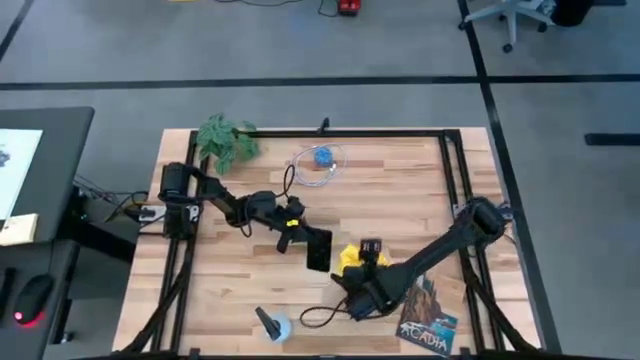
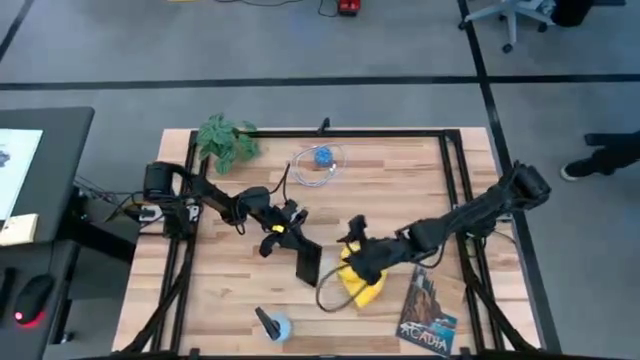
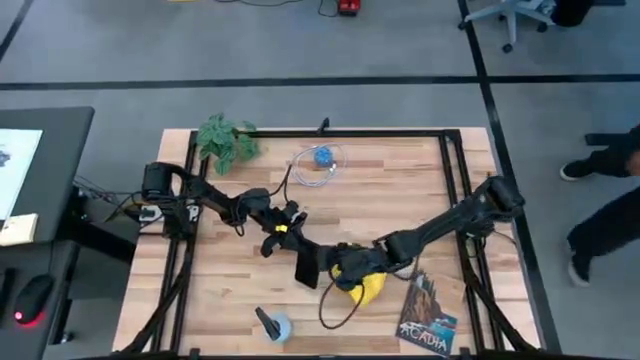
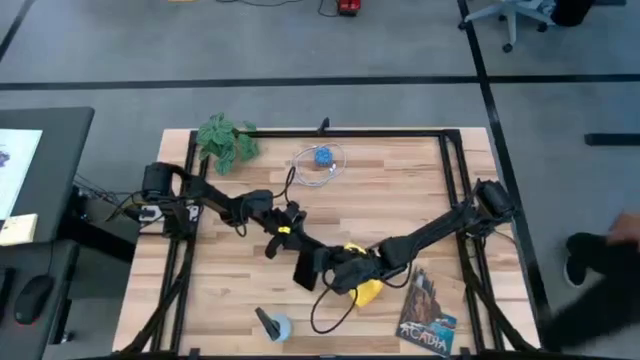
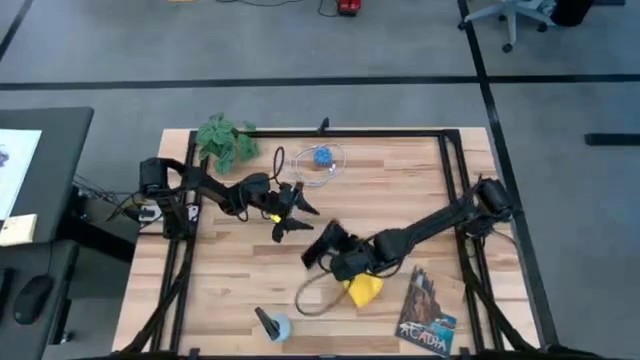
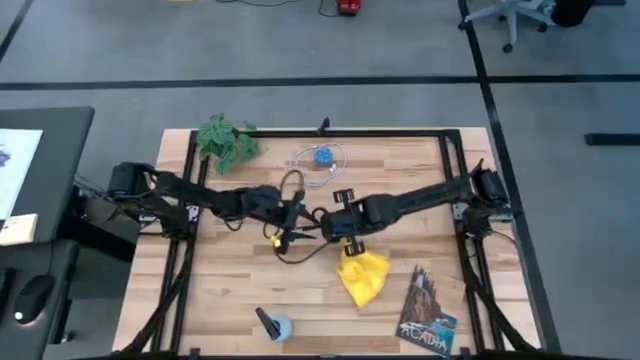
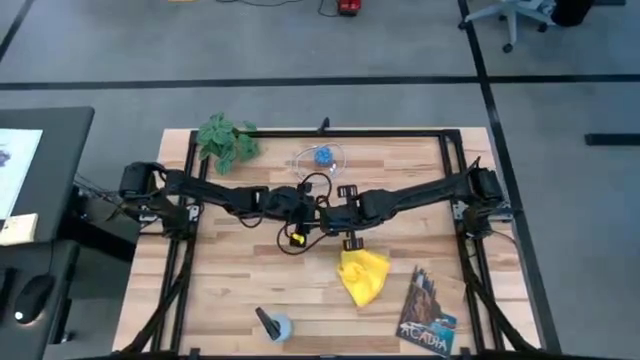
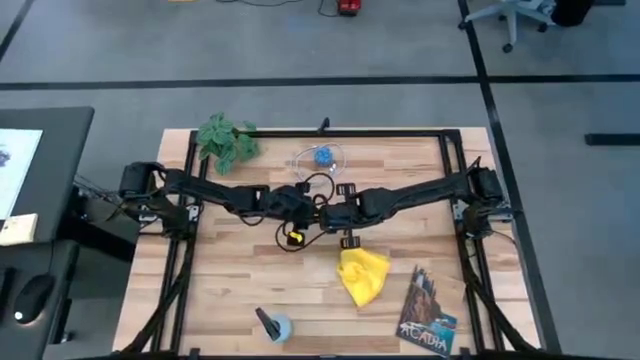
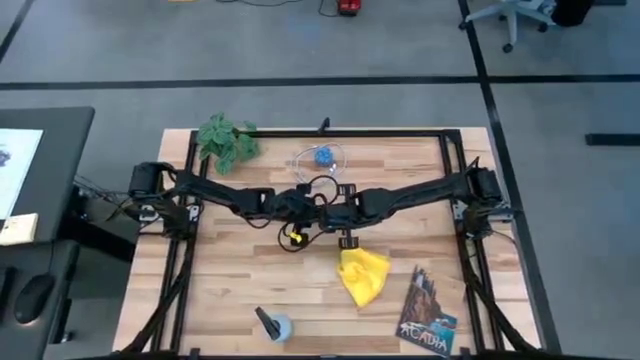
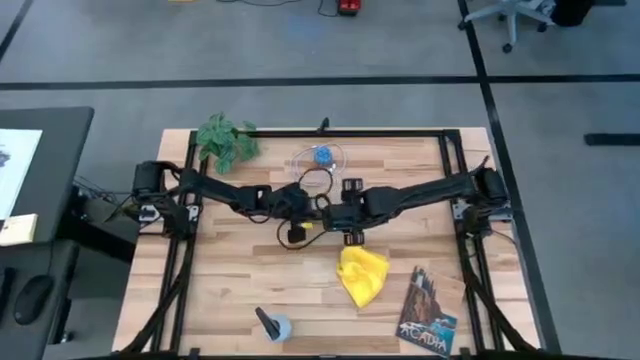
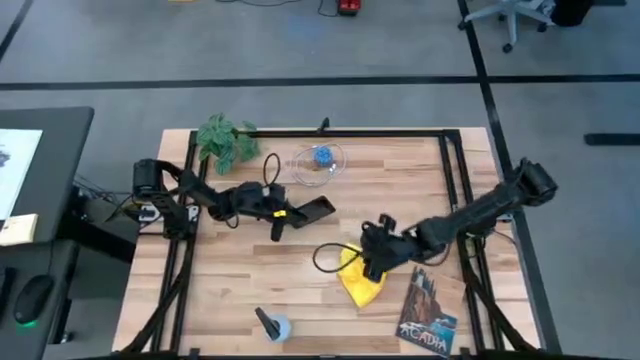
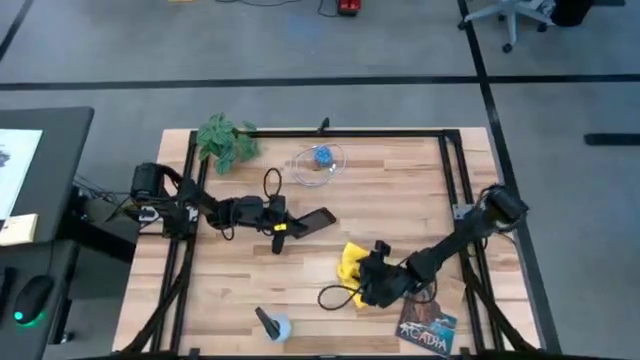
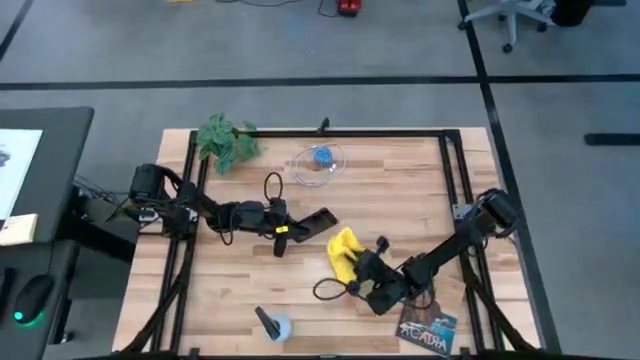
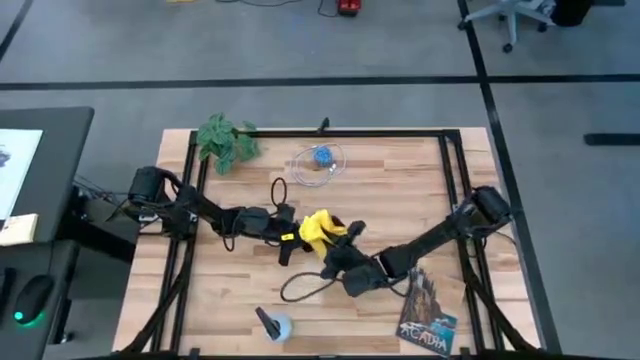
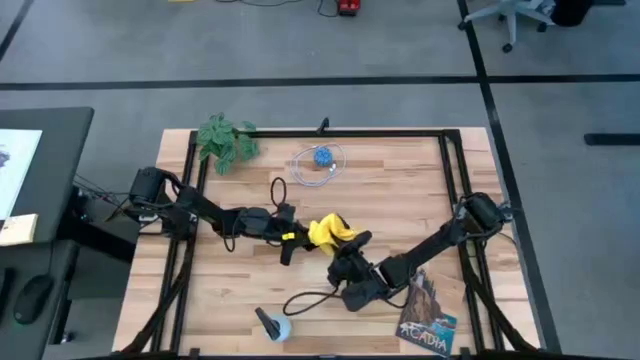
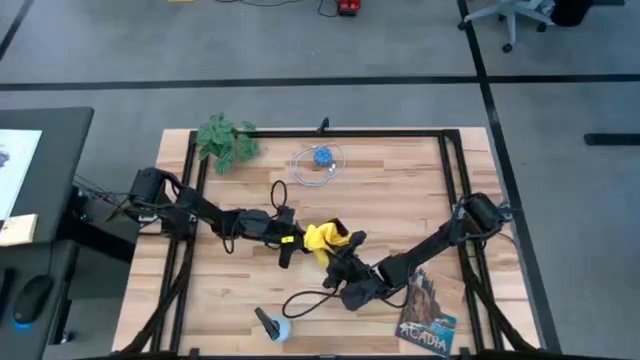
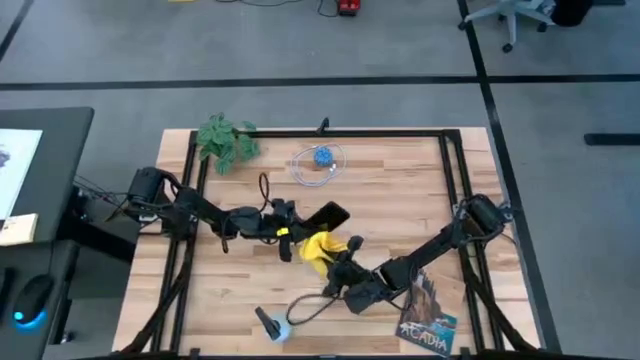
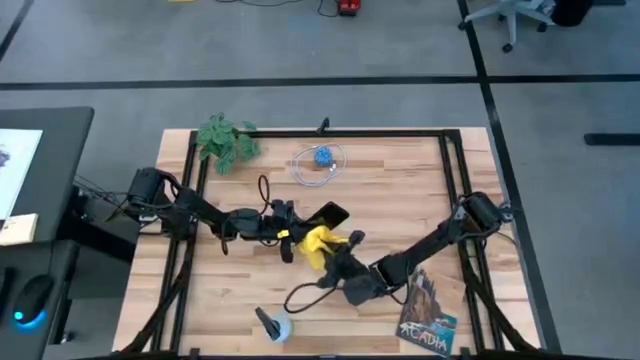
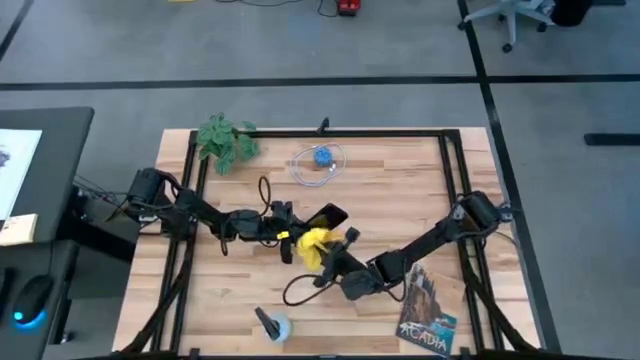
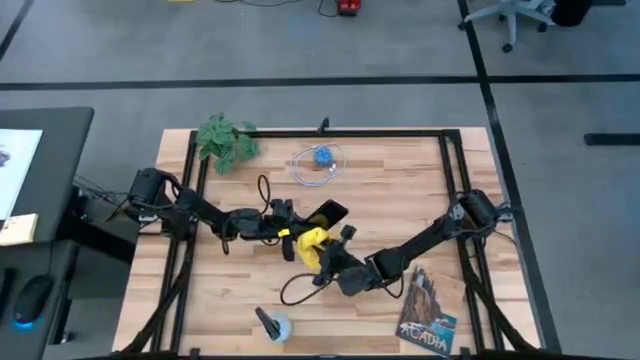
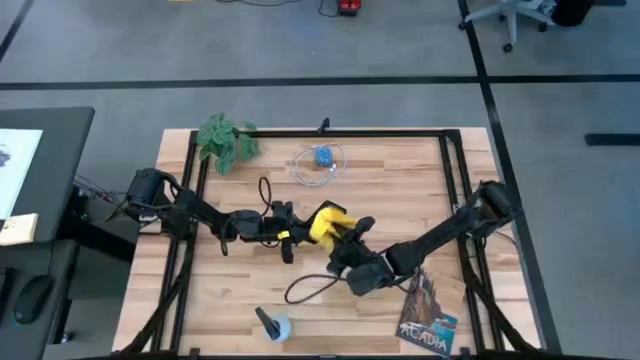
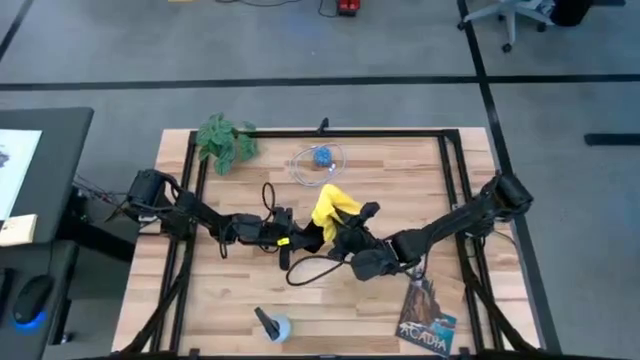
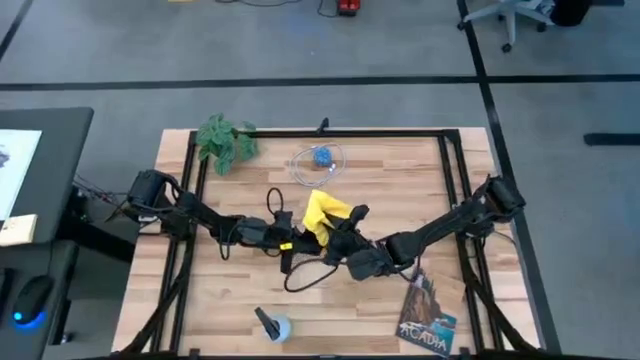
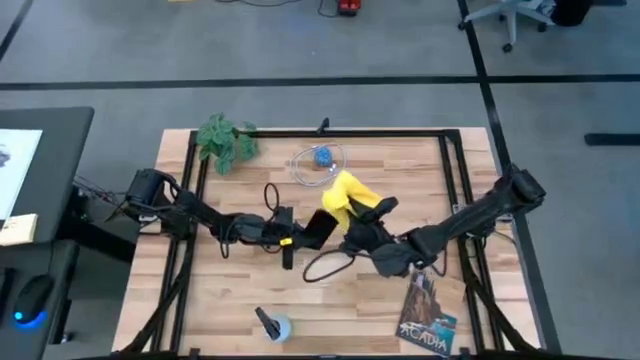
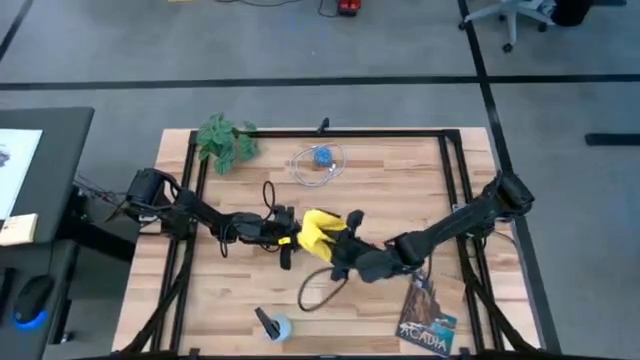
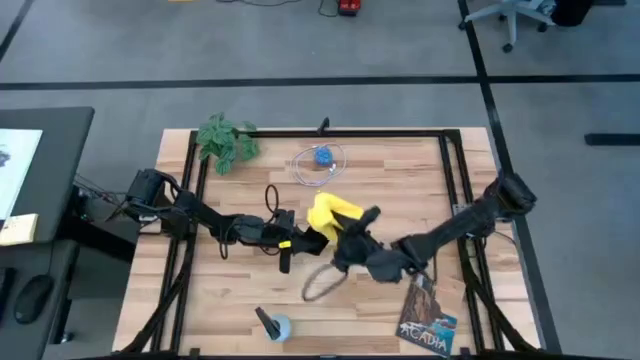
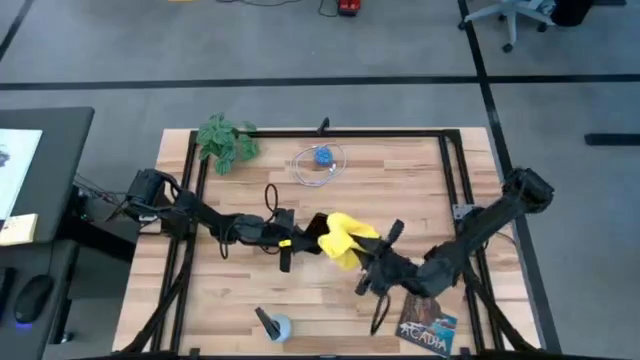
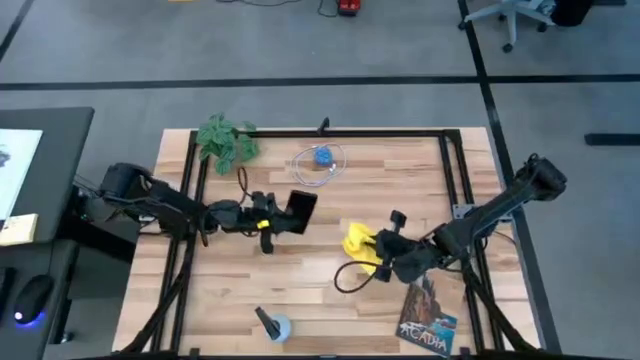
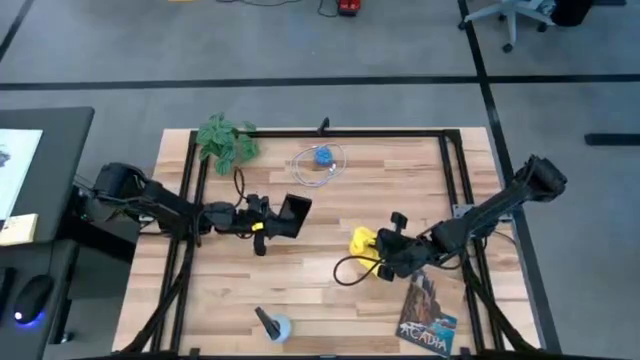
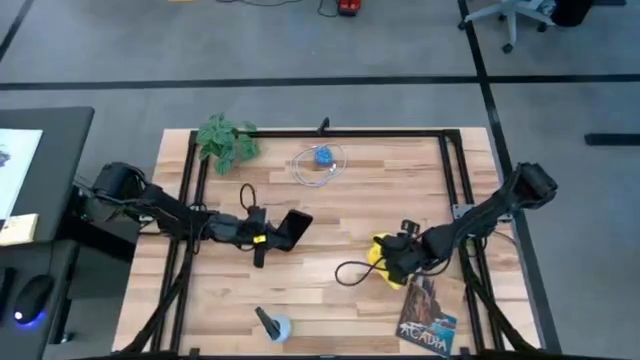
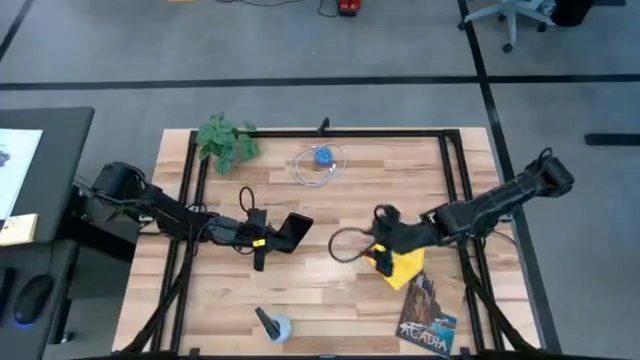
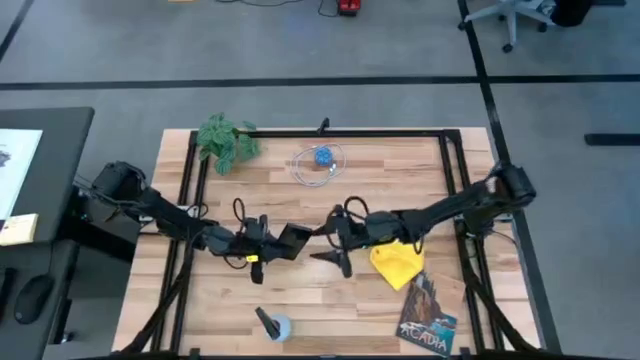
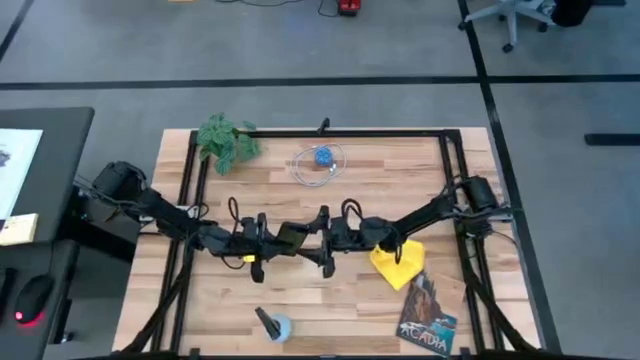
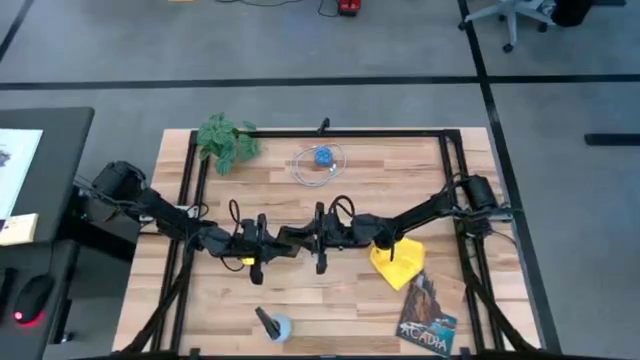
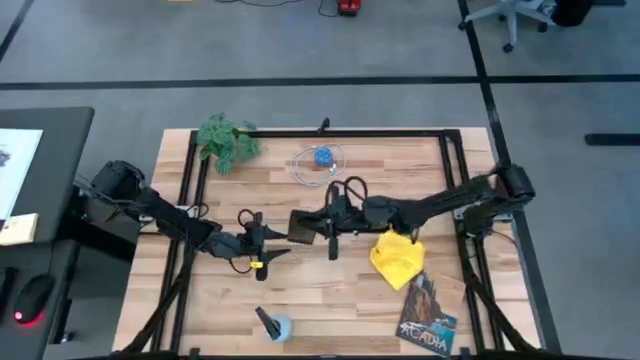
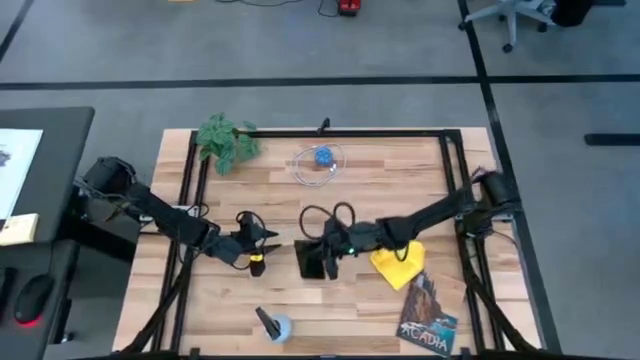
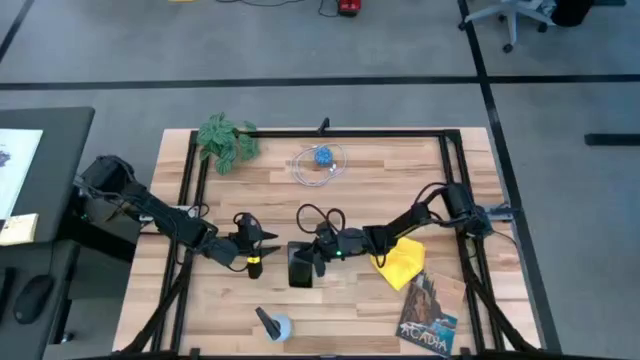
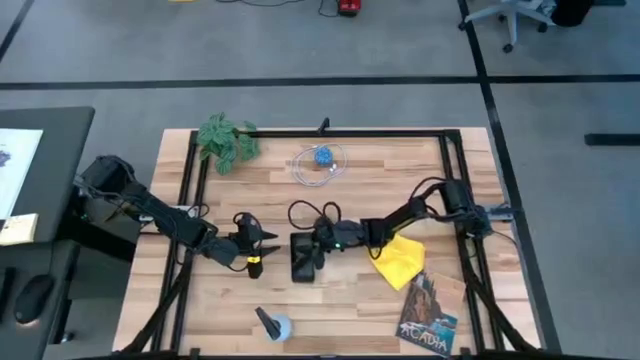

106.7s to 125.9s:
Task: Apply microfiber cloth
Wipe the cellphone using a microfiber cloth

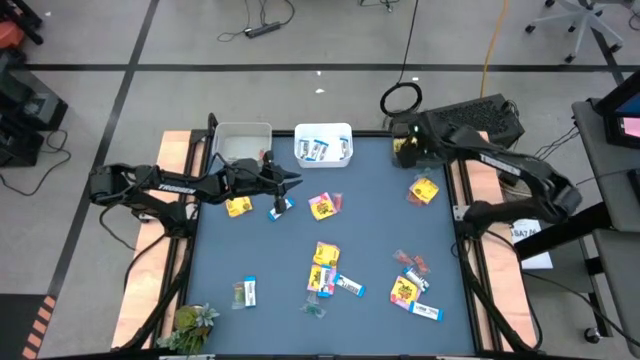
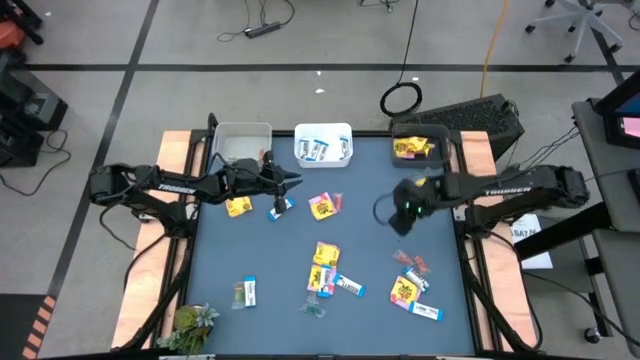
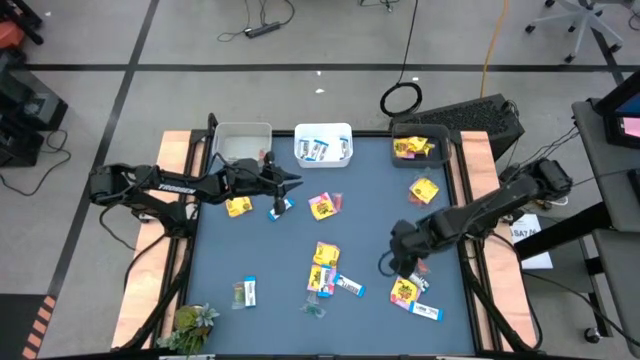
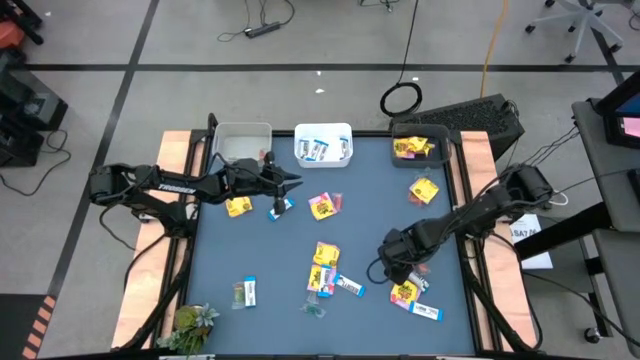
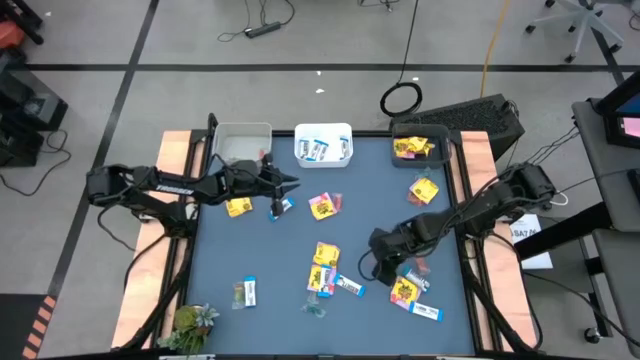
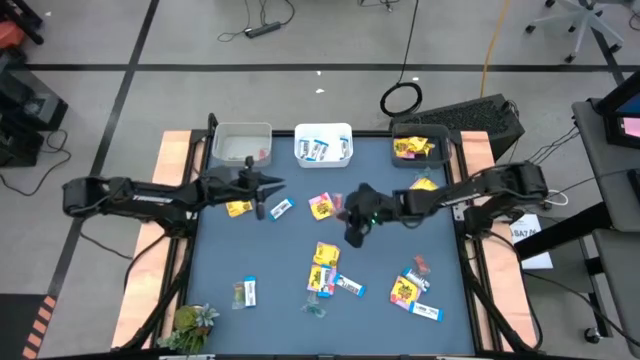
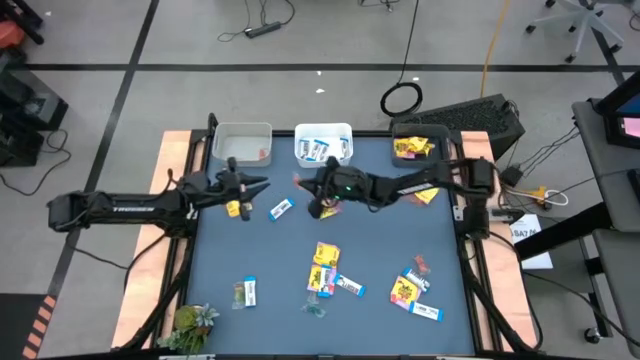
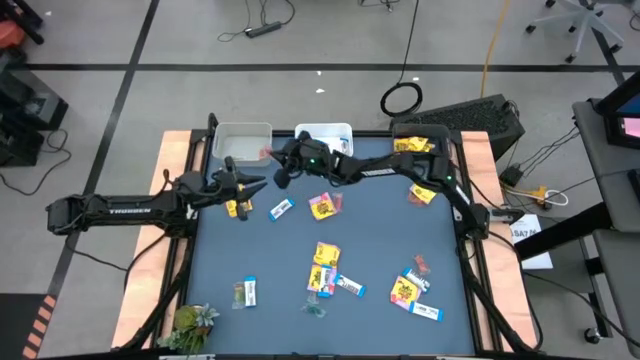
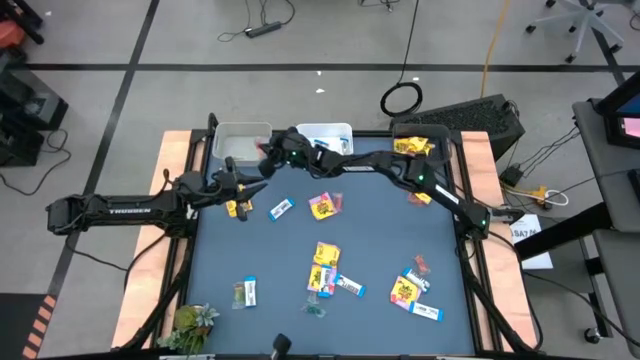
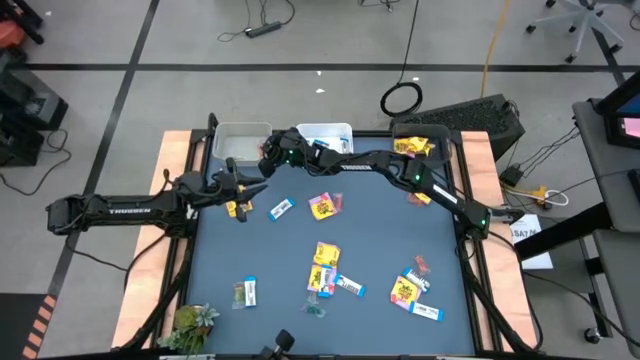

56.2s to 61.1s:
Task: Sort candy
Put the orange gummy into the gray bin
